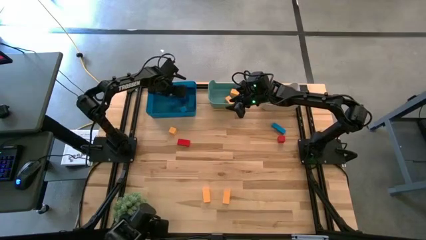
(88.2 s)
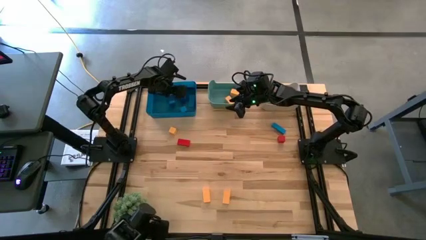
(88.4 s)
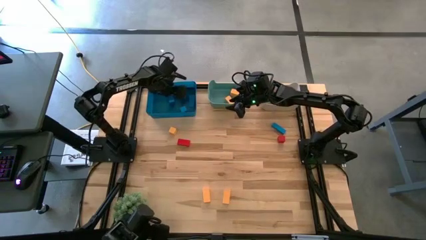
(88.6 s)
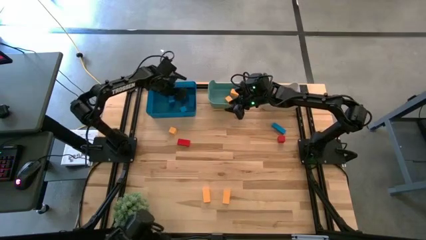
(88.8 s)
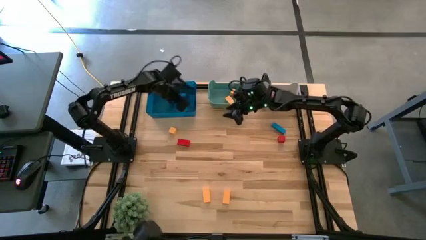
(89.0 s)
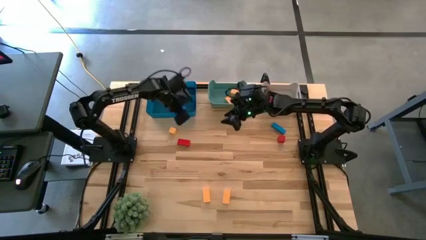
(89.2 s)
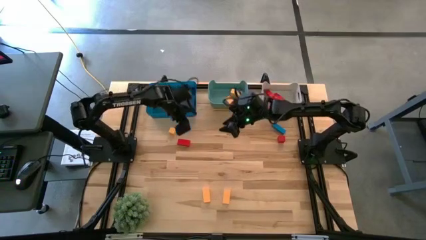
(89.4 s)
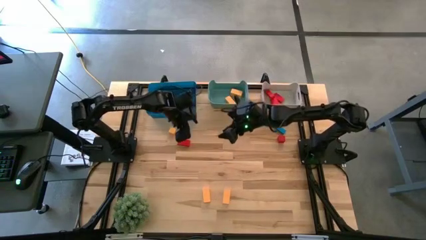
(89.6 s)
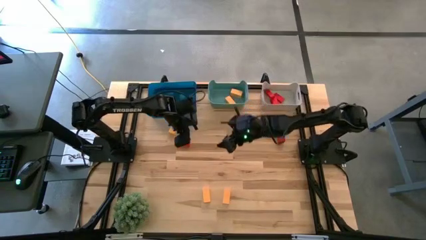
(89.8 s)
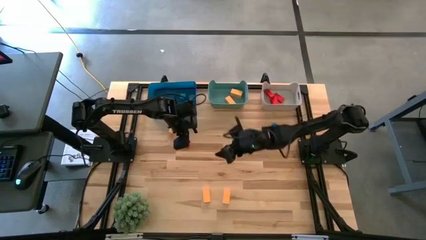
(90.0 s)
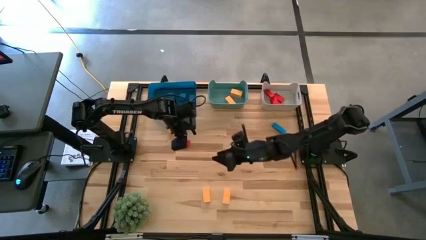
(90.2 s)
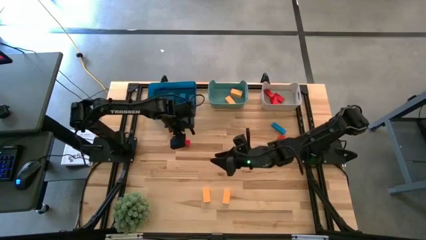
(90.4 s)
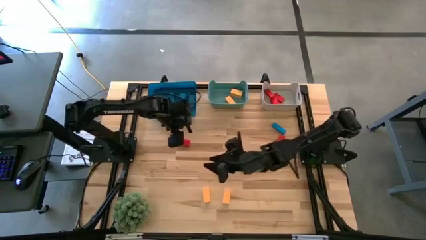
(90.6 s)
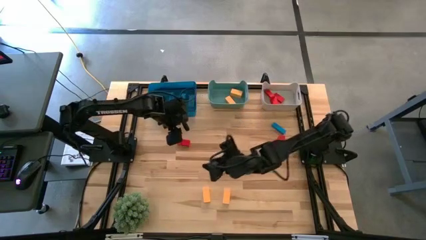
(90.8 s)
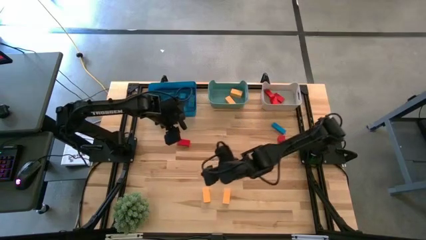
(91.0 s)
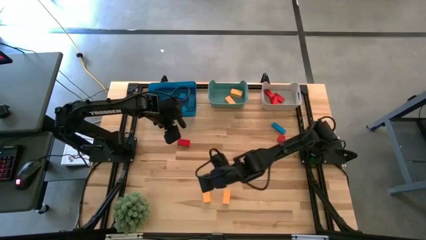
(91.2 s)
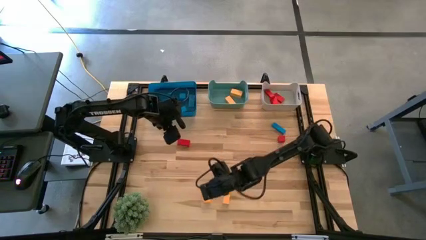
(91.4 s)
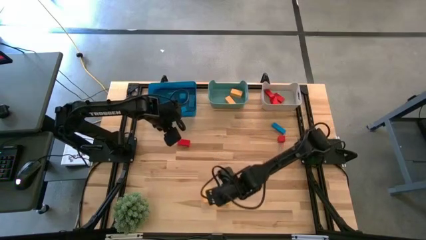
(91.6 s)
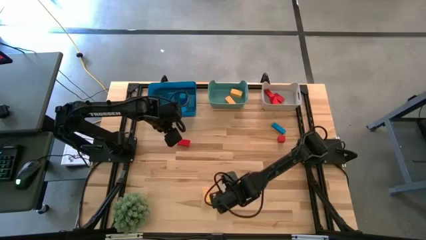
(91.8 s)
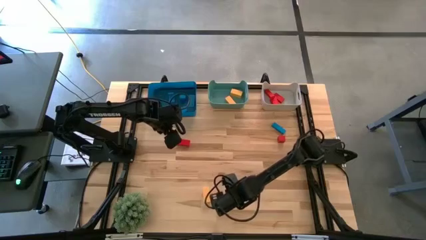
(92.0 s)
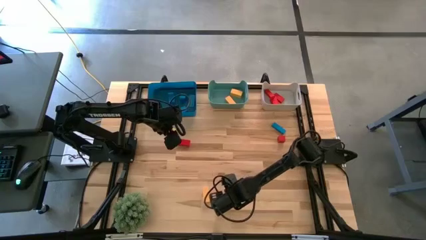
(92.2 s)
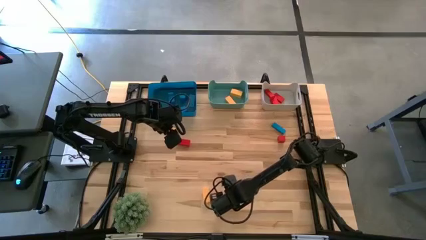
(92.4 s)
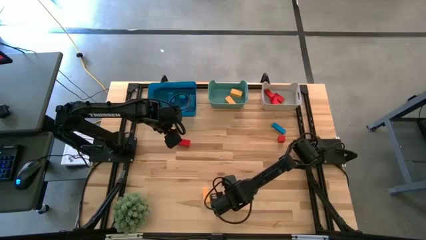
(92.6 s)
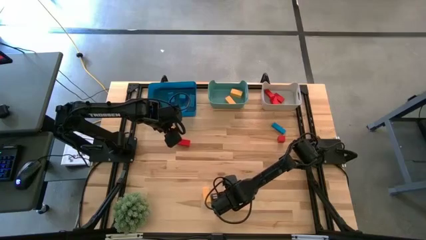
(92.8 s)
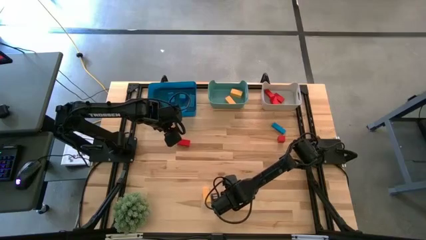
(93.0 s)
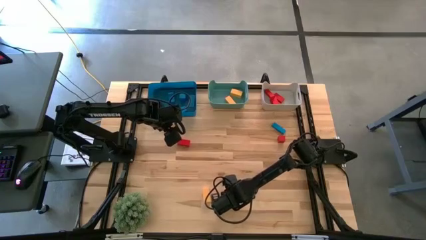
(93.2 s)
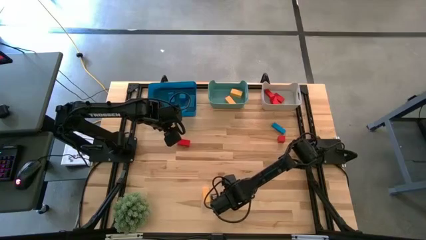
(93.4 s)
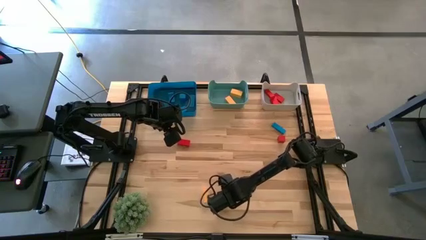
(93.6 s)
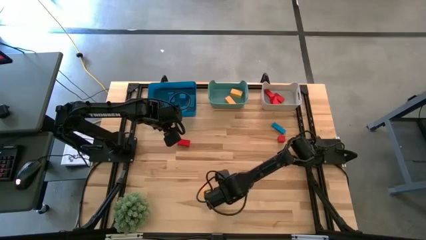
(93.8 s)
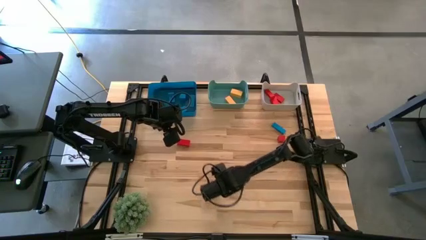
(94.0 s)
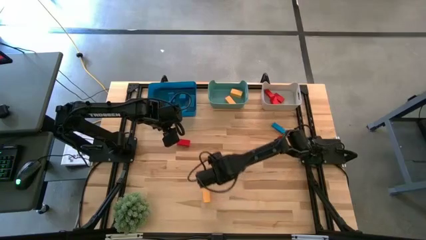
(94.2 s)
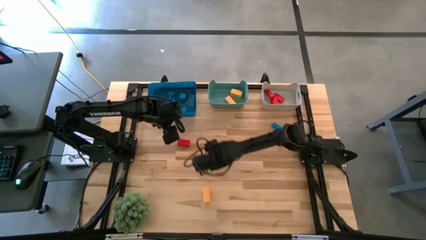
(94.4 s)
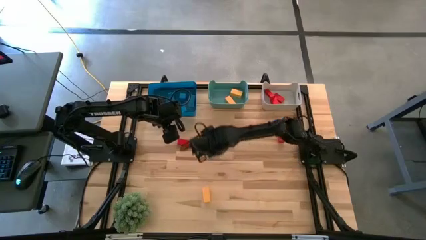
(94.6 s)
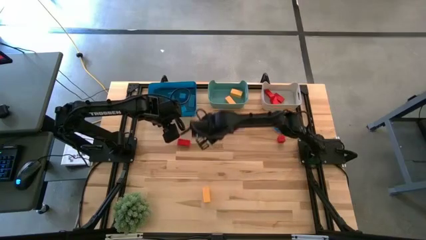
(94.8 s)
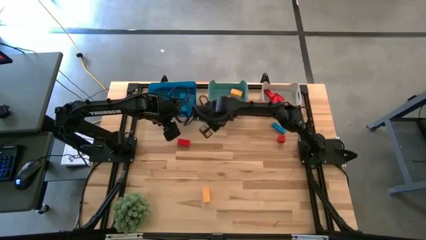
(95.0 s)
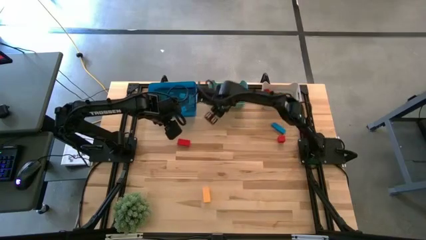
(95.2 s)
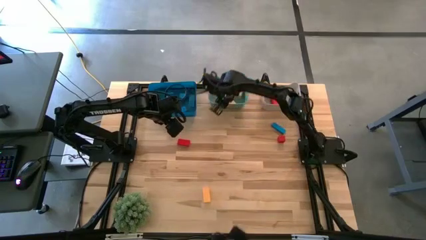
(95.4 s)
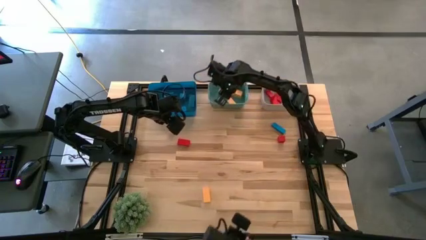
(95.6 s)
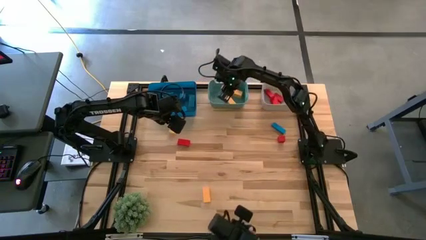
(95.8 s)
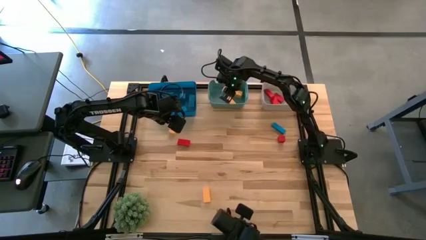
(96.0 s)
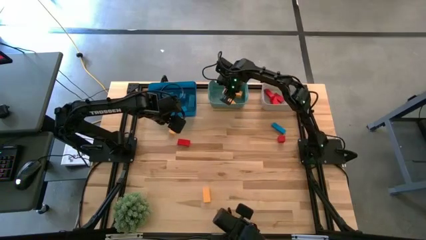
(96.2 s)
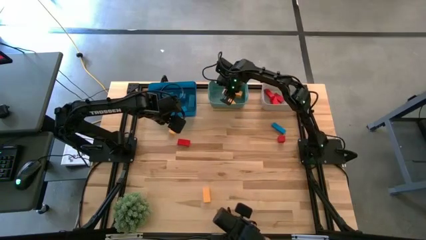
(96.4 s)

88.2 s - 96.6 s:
Task: Sort & place blocks by color
Put the yellow block into the green bin

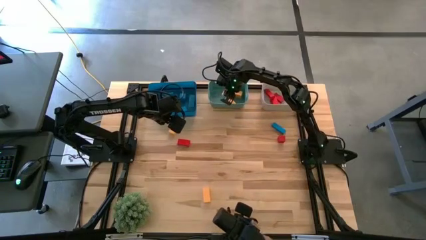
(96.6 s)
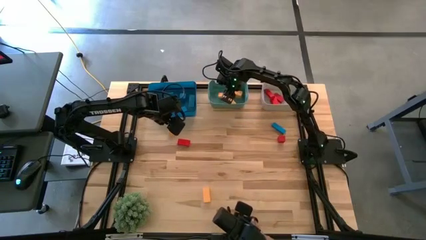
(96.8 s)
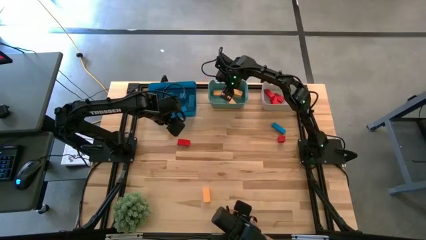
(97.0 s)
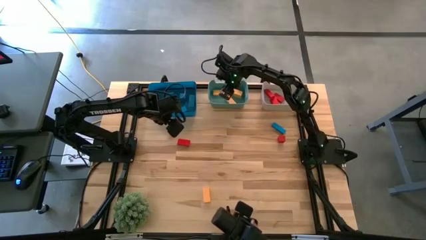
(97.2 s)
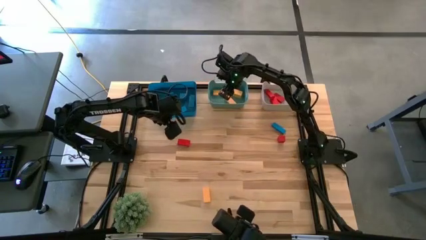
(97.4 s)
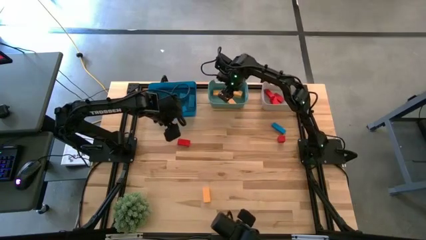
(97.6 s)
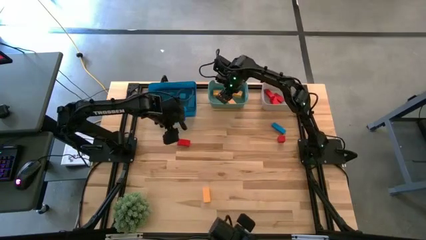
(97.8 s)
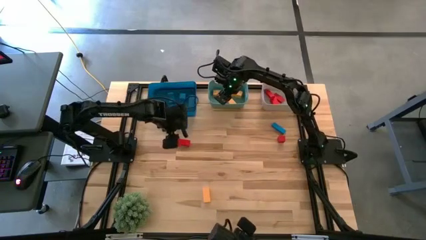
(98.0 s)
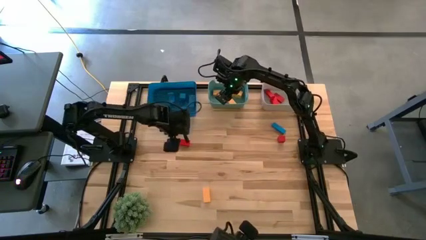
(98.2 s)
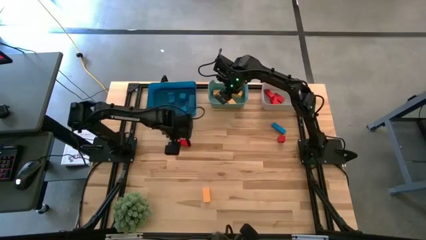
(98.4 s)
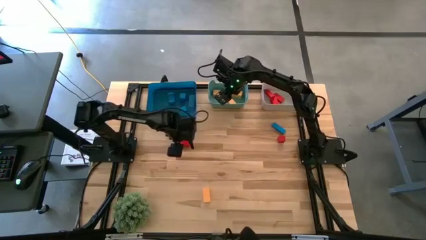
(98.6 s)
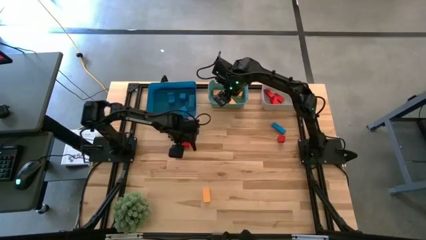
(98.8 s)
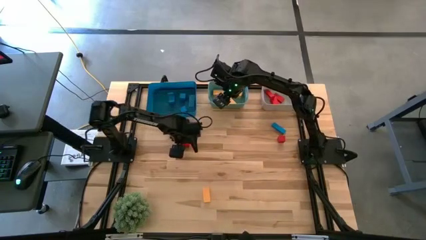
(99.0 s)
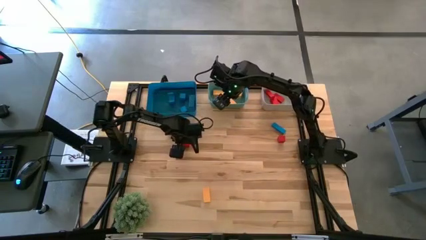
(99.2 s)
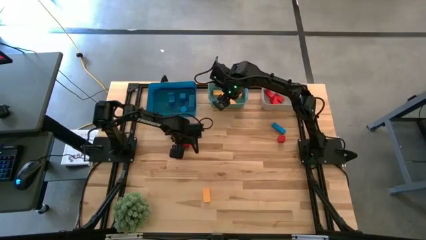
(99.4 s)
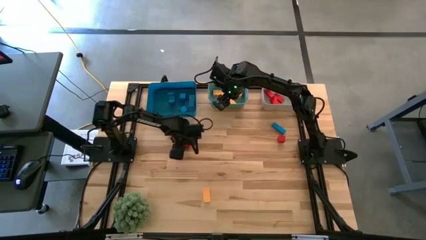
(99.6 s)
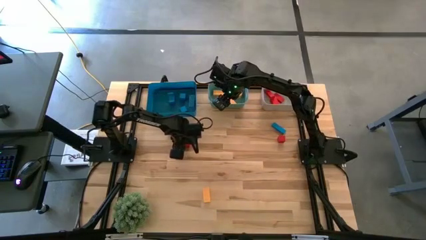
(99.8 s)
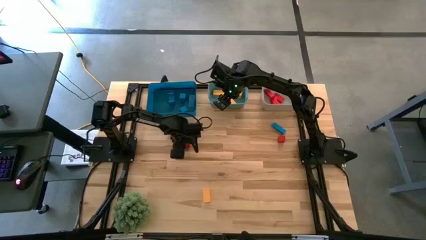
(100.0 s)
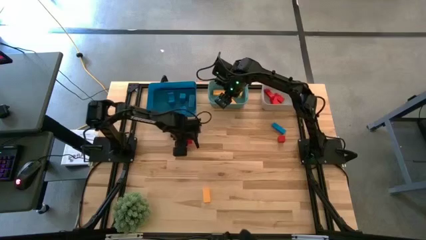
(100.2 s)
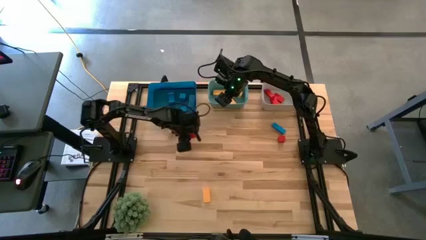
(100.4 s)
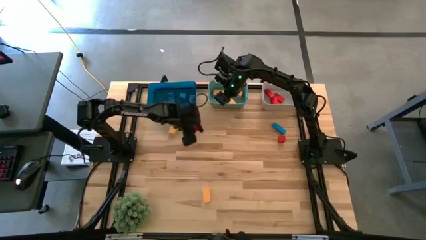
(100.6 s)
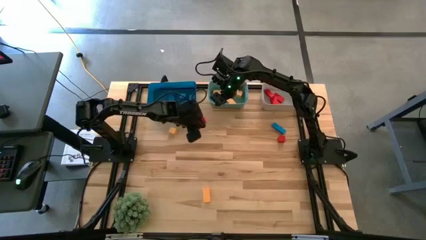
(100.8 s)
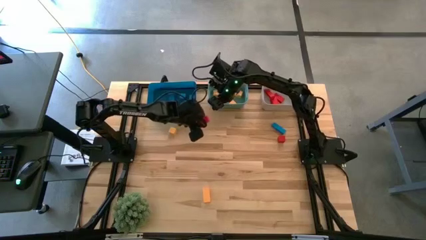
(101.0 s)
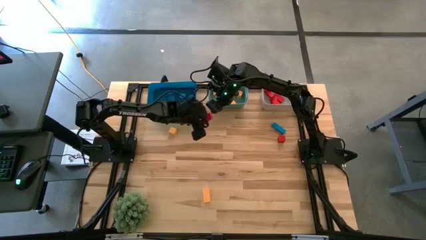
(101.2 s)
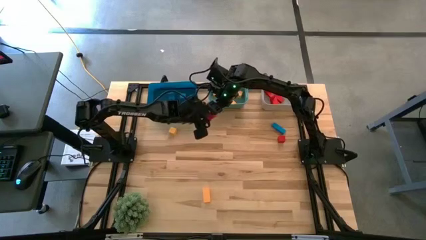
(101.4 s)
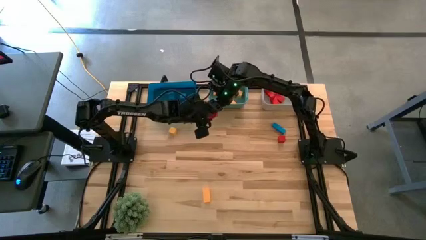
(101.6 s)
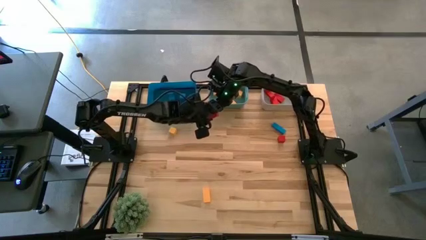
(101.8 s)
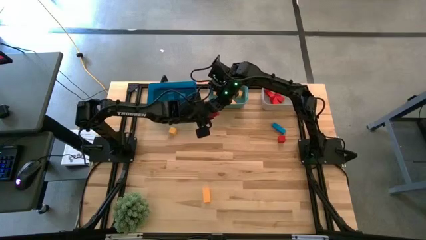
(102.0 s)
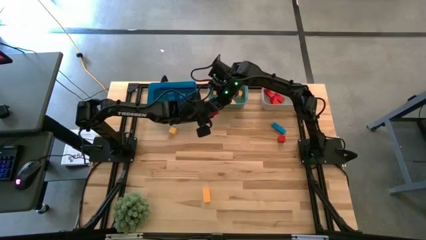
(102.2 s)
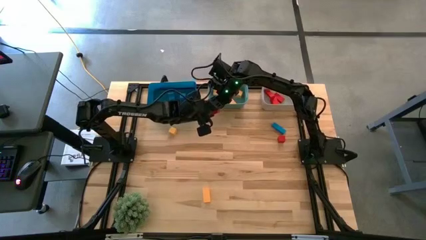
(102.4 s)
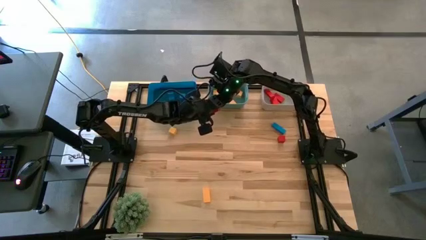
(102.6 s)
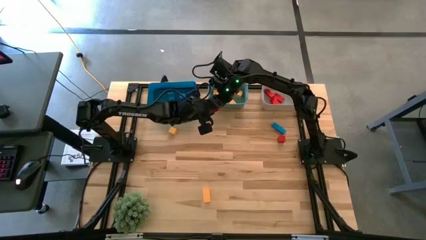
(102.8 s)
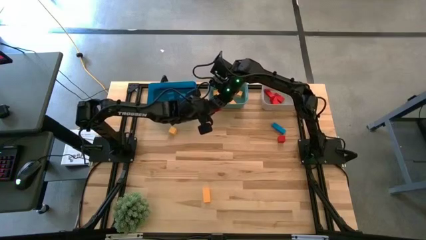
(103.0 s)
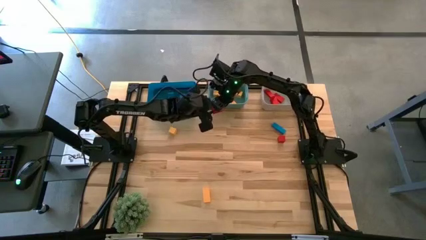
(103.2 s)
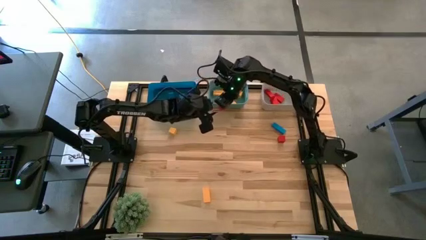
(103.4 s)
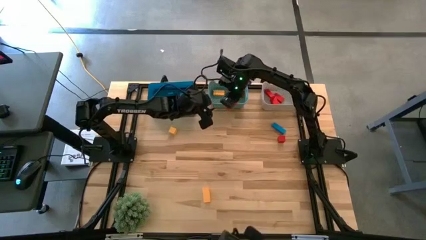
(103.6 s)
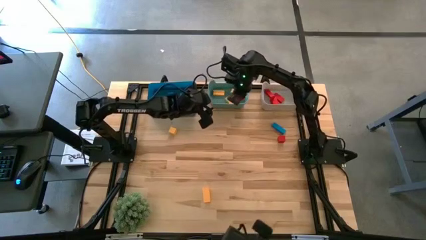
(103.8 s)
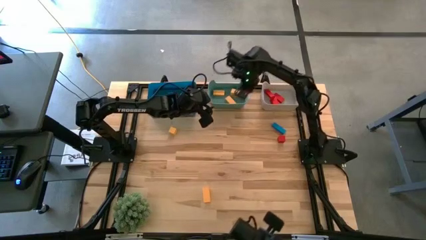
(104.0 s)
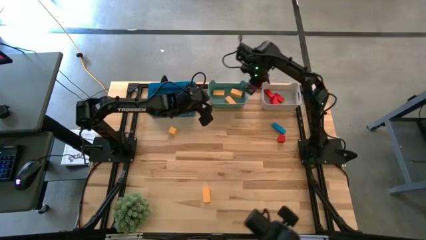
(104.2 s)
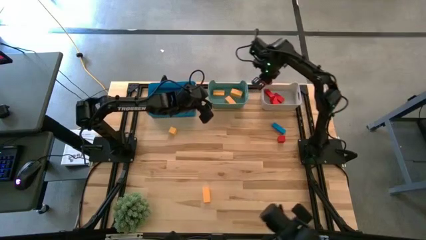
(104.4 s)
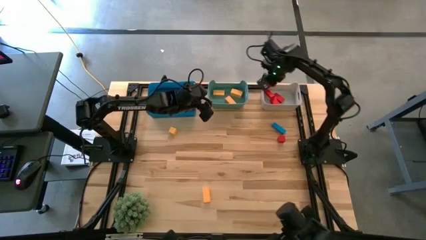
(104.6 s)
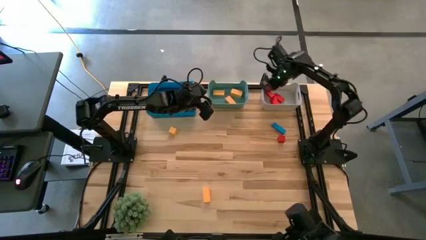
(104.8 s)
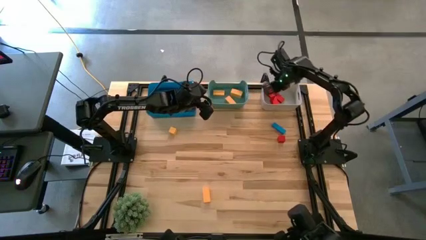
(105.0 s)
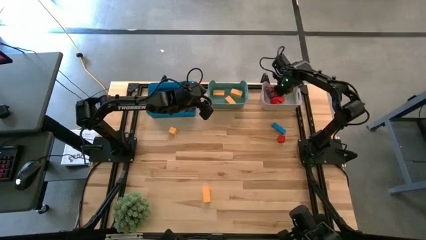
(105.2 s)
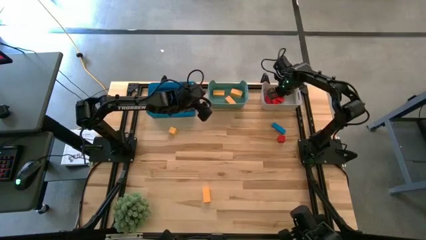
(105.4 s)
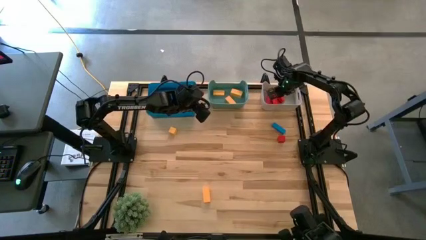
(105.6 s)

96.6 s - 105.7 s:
Put the red block into the grey bin
